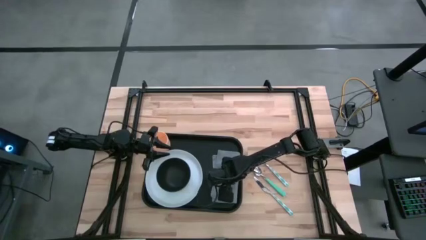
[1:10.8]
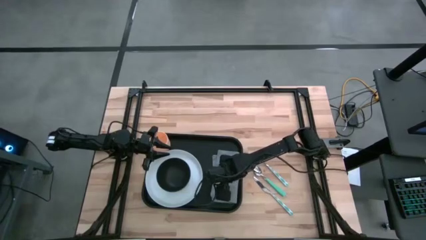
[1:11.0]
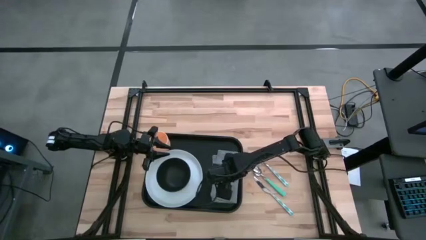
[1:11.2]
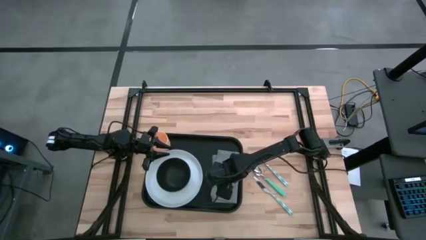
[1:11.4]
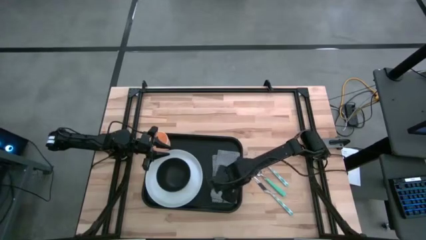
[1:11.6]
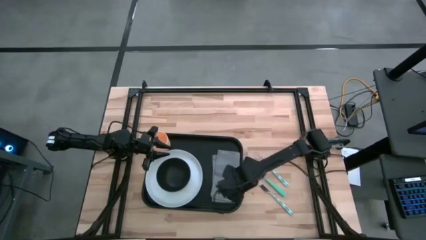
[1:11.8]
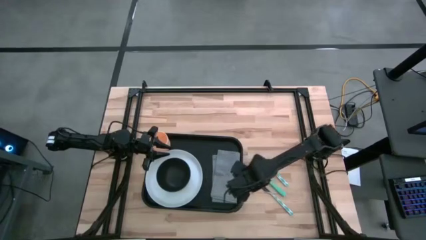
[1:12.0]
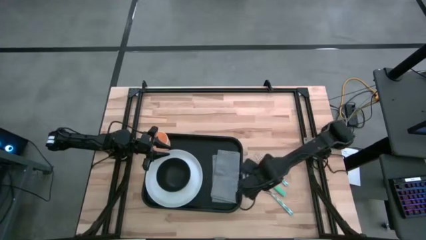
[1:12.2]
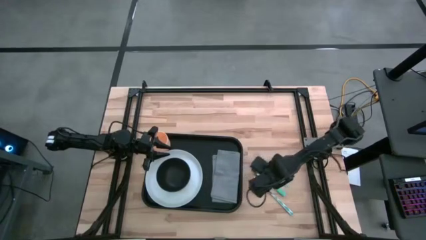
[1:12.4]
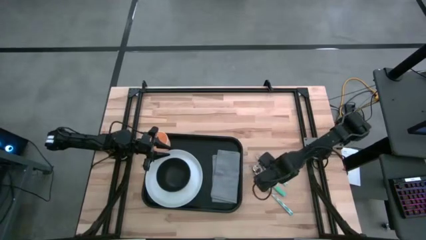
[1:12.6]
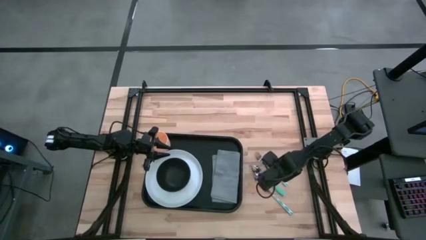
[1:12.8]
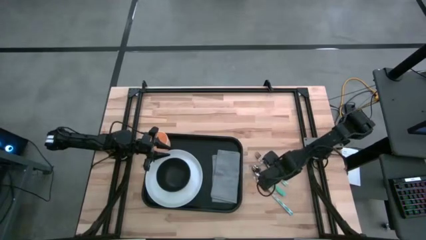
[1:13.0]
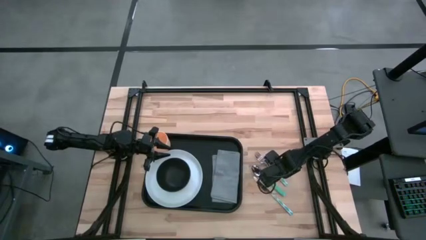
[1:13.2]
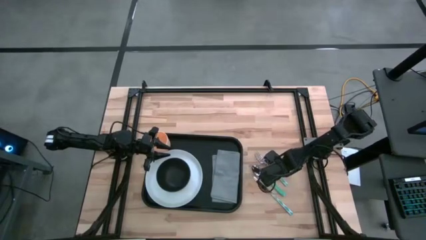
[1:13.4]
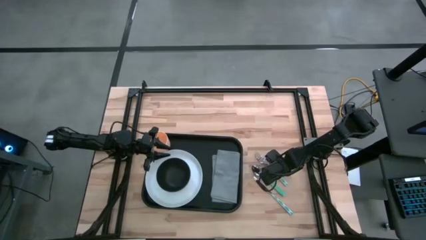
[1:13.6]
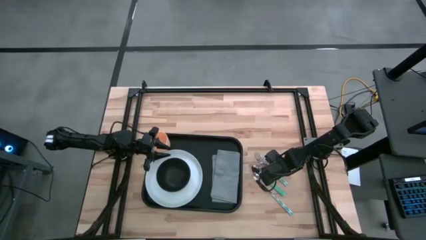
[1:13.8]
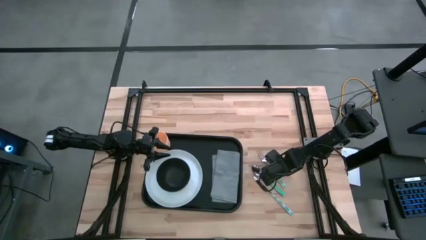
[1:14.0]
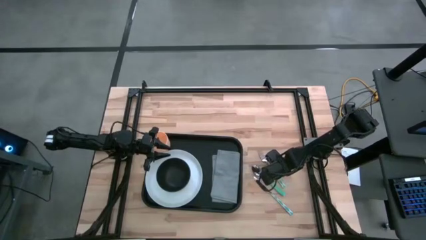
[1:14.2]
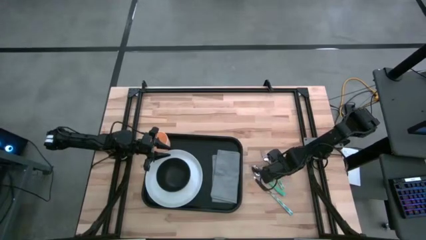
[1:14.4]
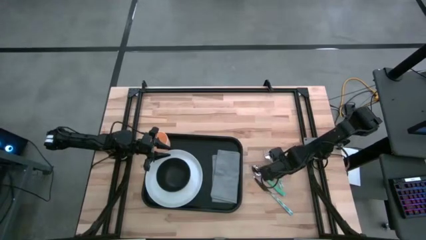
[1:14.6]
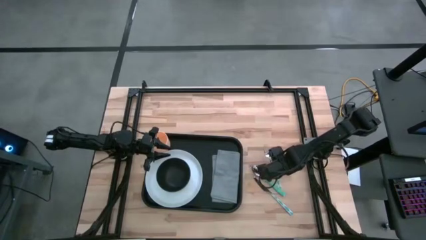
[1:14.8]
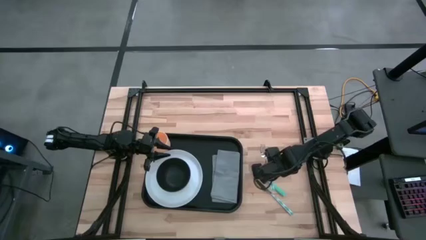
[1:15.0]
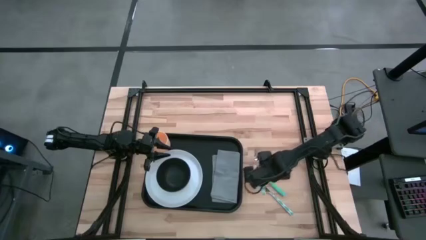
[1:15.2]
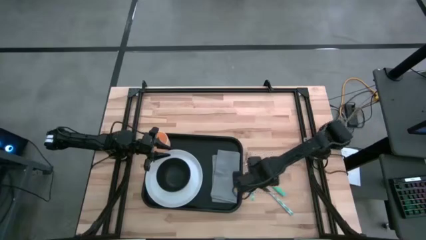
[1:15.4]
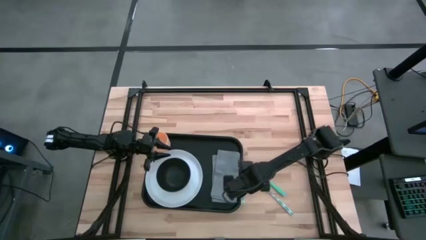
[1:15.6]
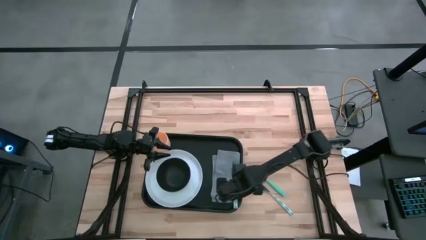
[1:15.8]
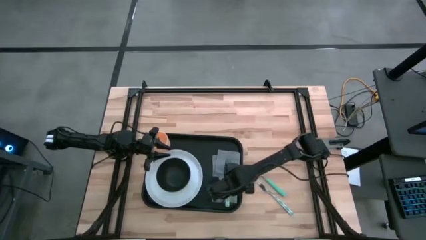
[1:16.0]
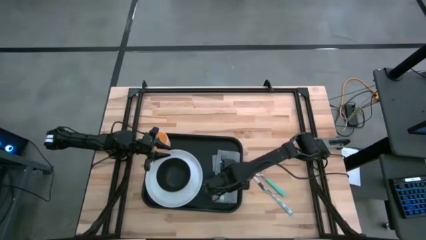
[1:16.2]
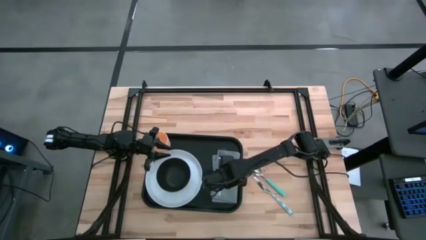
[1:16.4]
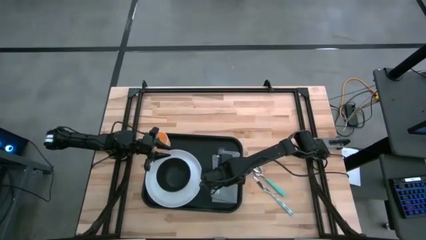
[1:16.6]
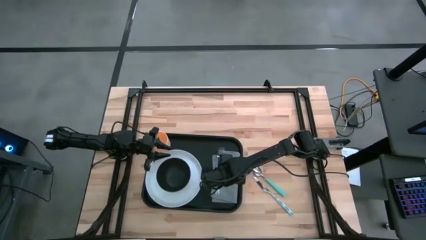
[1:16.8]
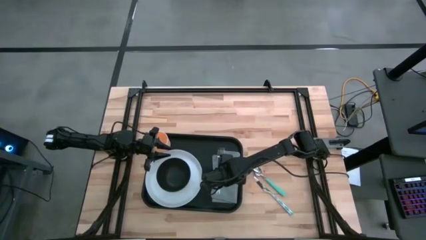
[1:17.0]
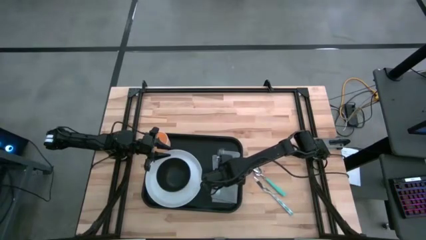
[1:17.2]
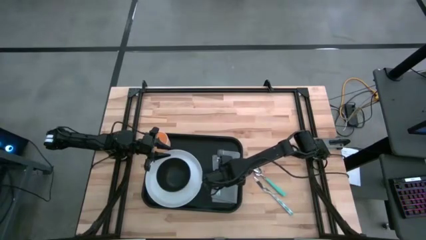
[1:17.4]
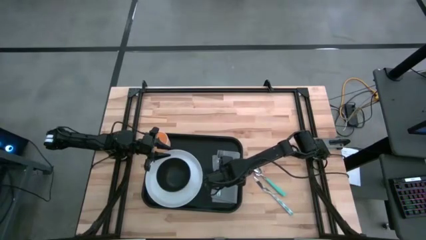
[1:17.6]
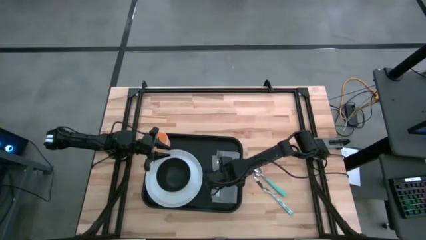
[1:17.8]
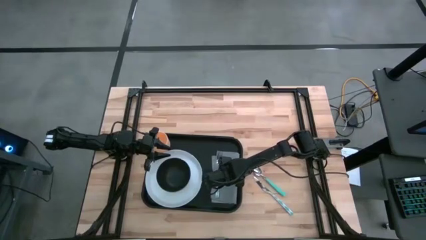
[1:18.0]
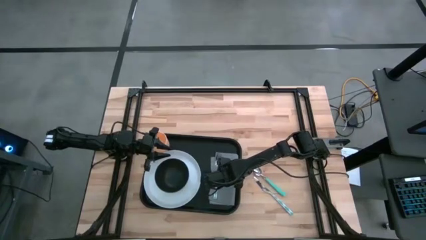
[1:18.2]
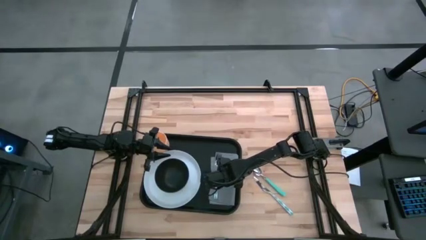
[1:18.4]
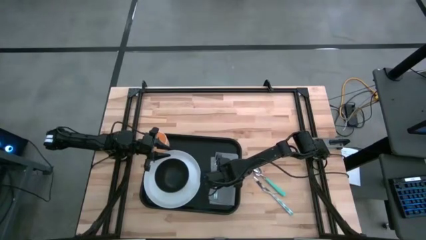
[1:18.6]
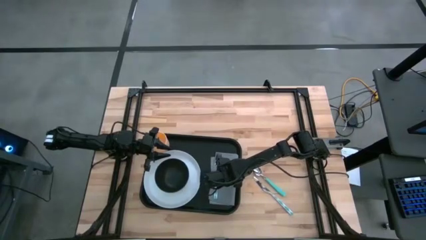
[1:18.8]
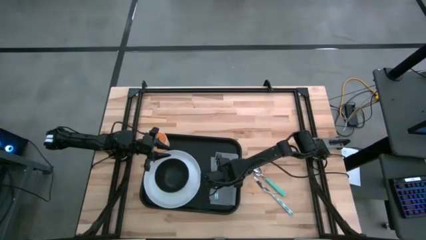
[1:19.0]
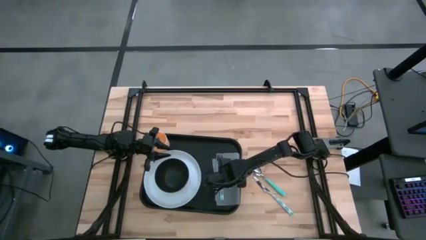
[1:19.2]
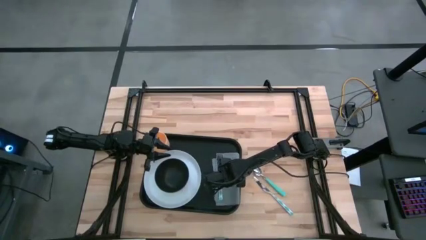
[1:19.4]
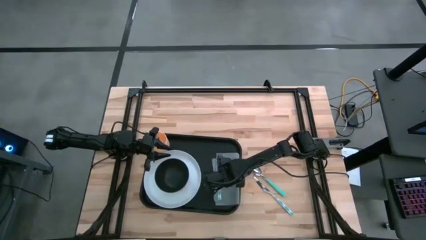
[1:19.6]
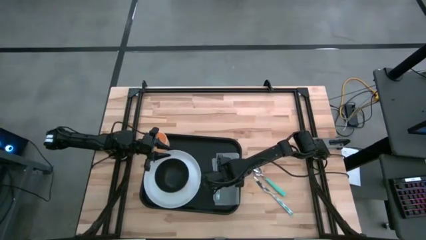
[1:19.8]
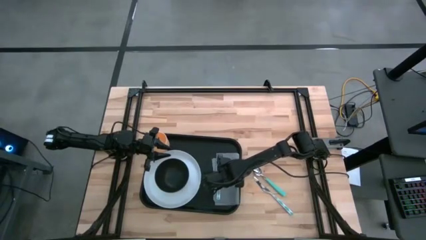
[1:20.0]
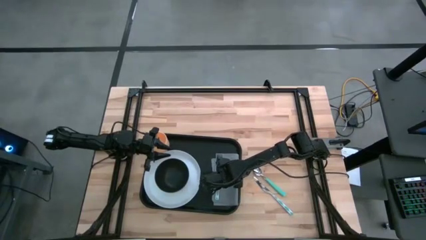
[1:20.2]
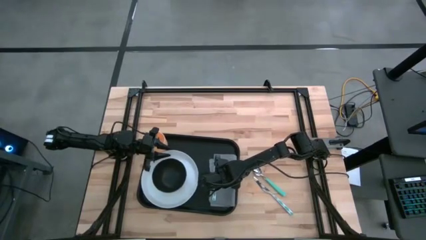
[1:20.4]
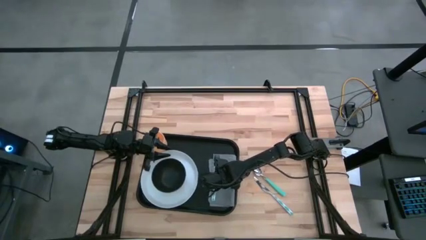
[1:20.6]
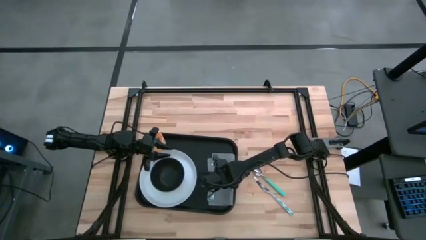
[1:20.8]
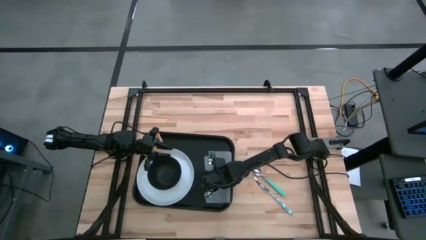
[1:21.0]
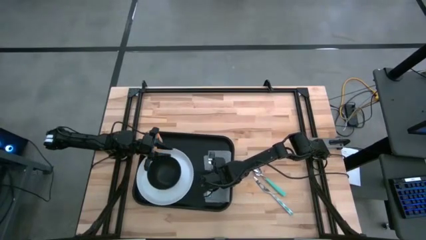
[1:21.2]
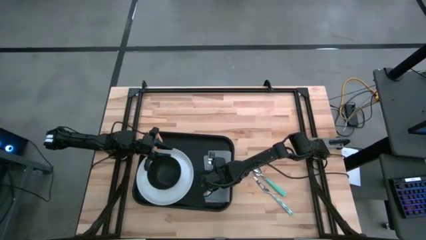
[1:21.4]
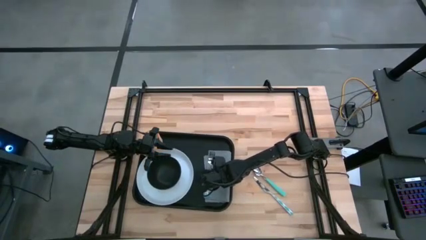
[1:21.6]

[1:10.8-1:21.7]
Task: Set up tray
Put the white fork on the gray napkin

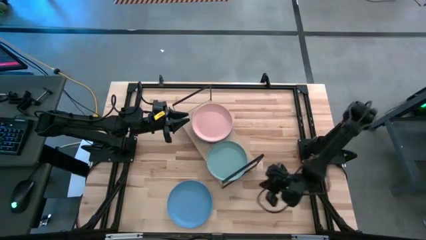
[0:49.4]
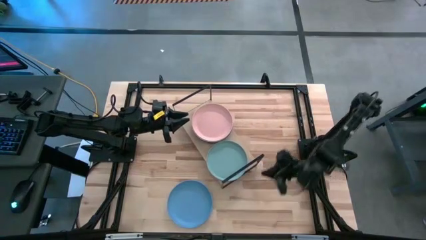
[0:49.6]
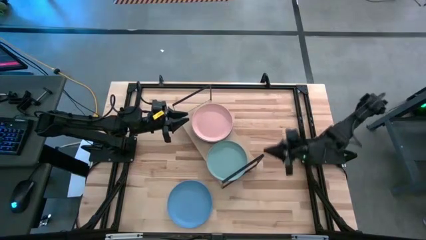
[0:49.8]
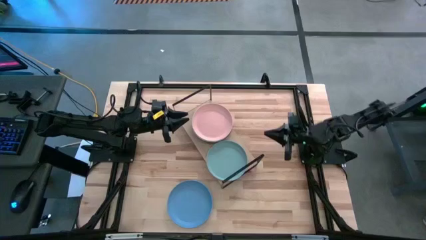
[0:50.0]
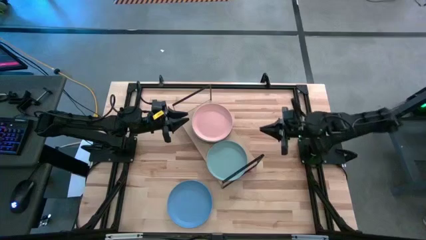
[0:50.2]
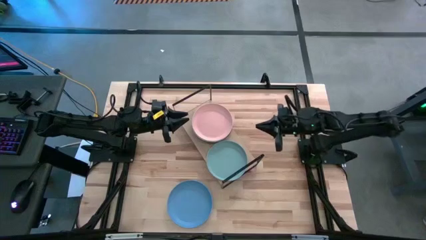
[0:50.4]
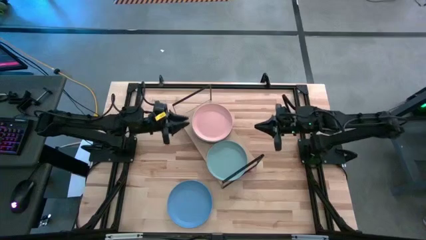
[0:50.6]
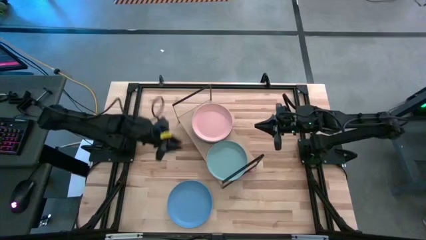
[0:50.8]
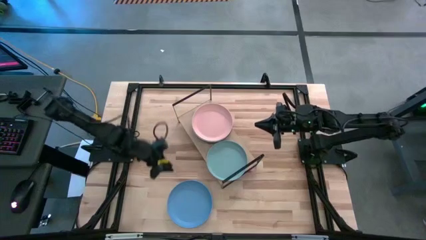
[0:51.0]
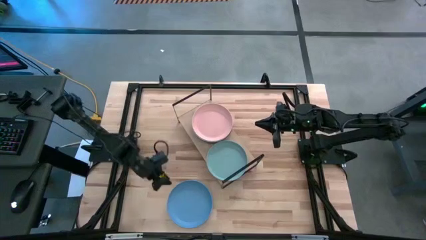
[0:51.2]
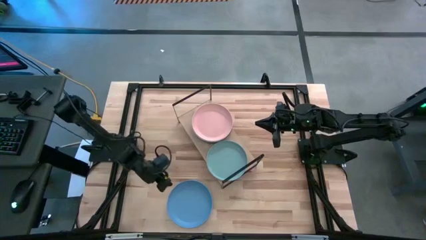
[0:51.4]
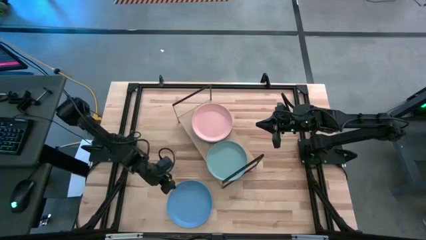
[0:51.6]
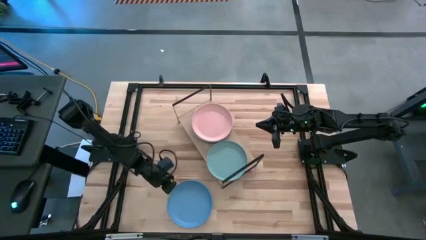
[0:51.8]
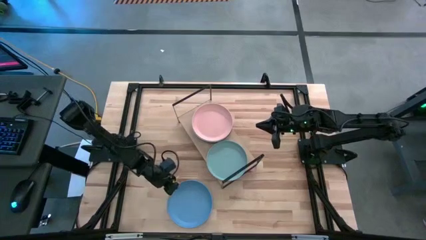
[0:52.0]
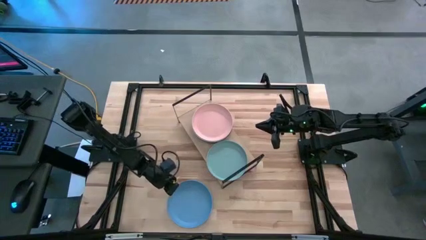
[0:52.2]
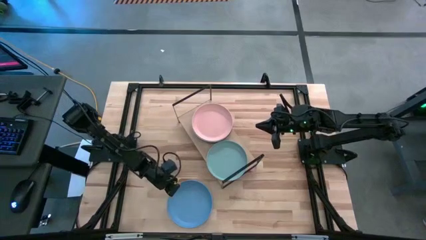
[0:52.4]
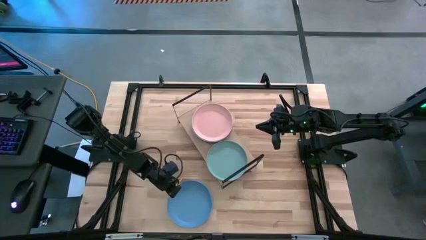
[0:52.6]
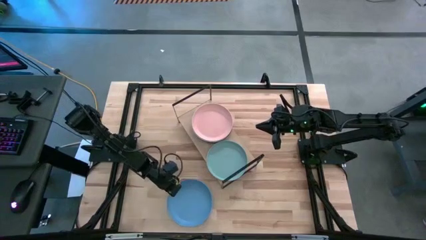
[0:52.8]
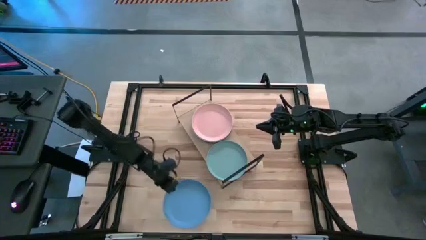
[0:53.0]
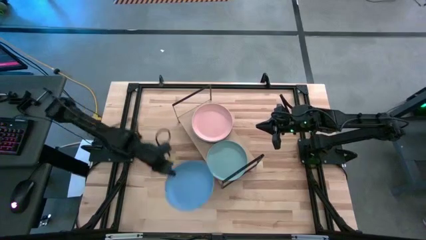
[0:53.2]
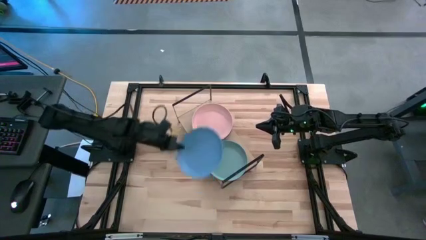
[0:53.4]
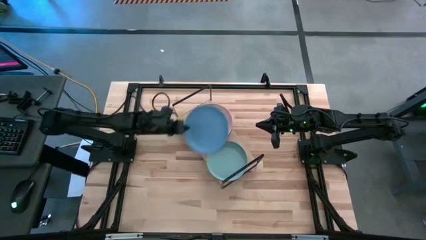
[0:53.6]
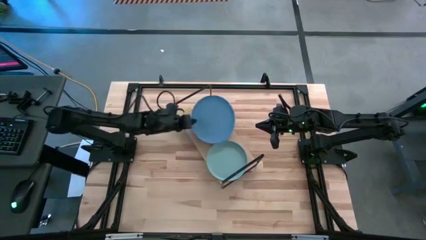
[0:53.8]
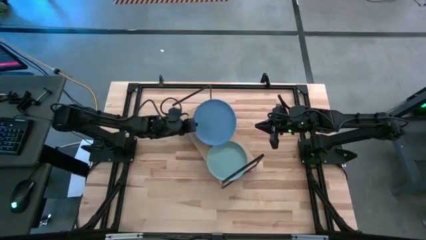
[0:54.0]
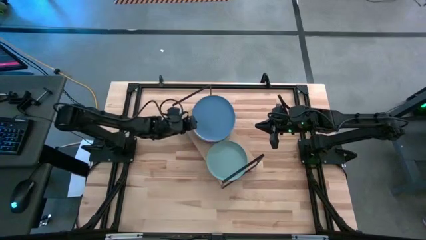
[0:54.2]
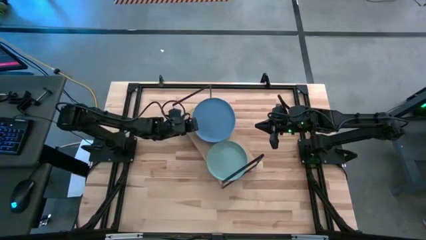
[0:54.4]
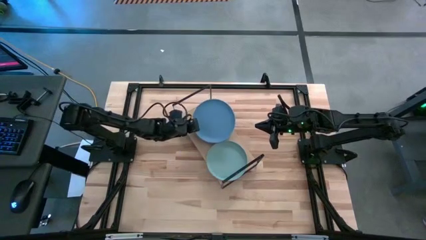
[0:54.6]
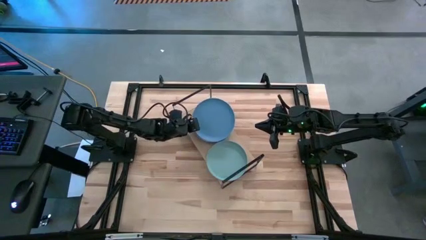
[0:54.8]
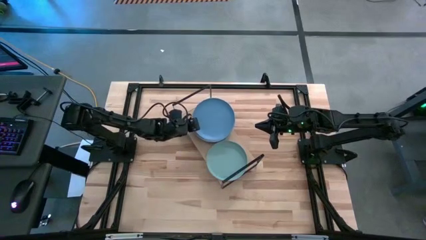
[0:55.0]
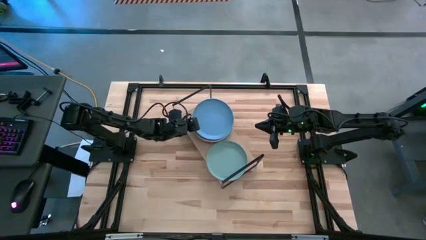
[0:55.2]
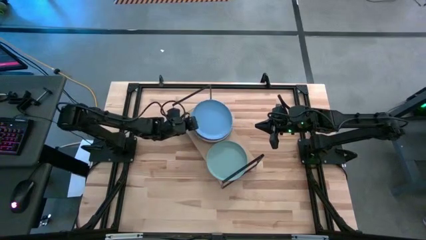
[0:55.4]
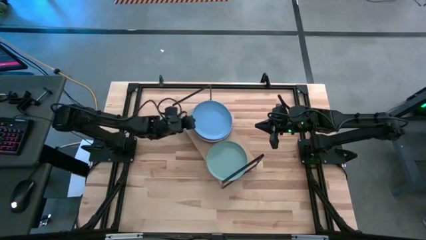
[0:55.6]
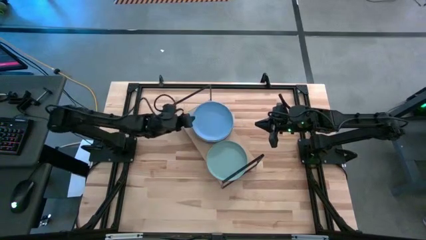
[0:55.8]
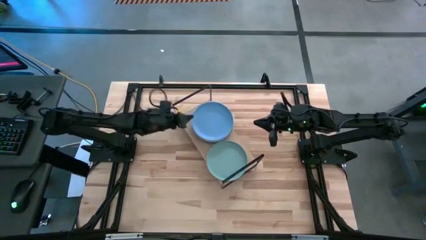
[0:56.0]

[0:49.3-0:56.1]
Task: Place and stack plates onto a shelf
Stack the blue plate on the top of the pink plate on the shelf
